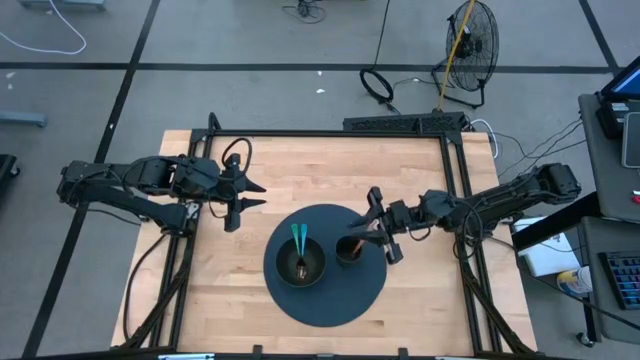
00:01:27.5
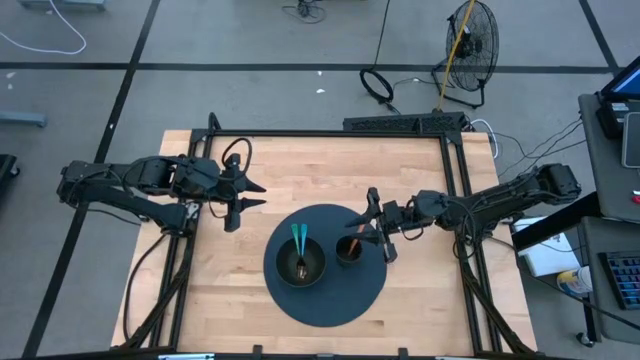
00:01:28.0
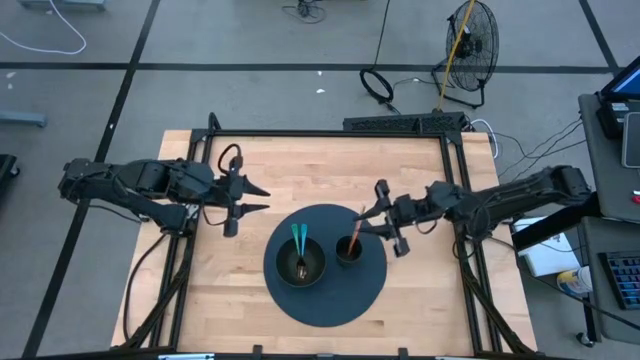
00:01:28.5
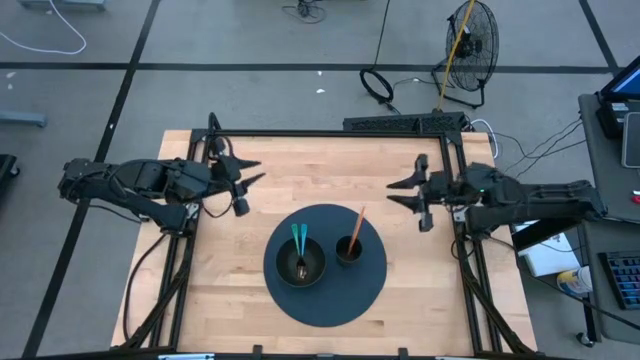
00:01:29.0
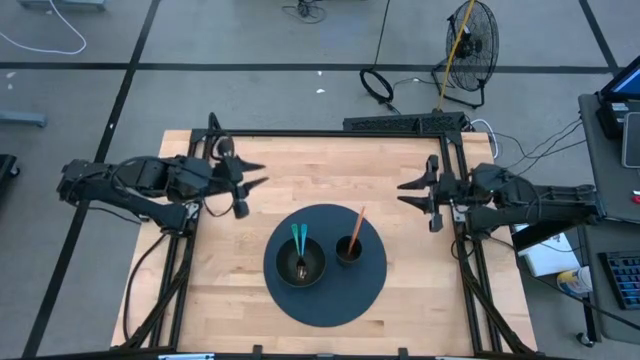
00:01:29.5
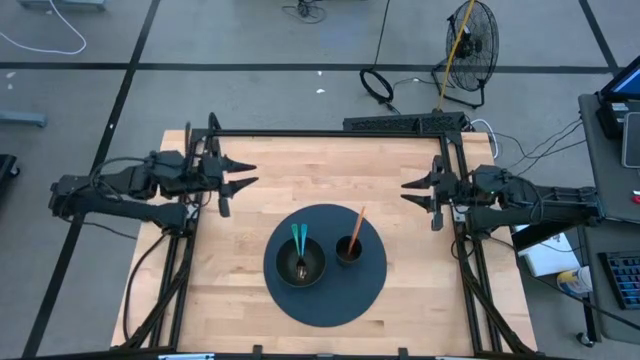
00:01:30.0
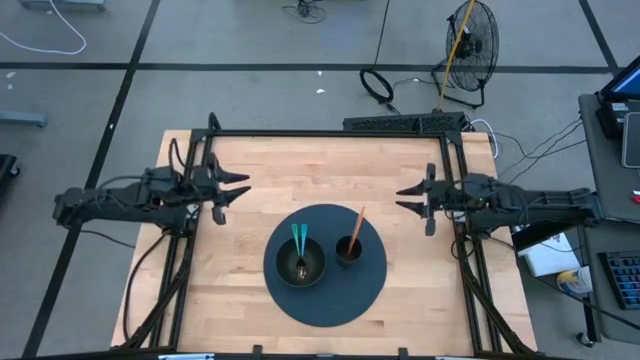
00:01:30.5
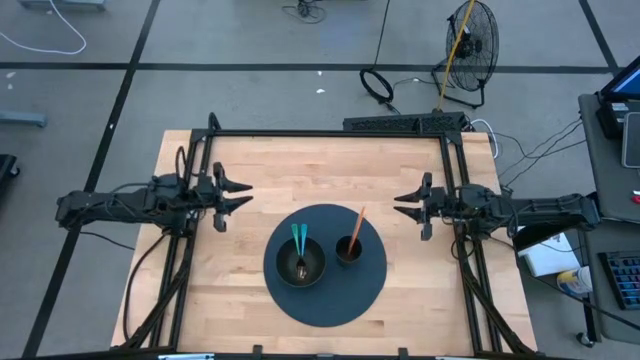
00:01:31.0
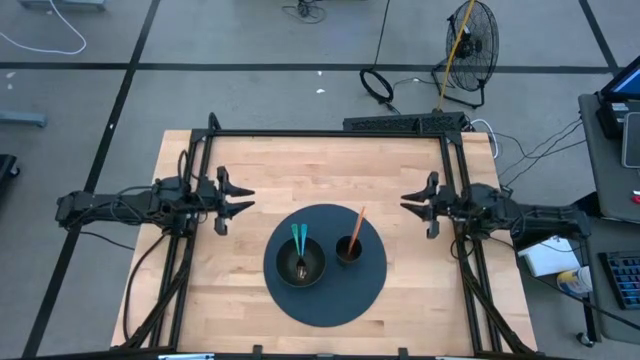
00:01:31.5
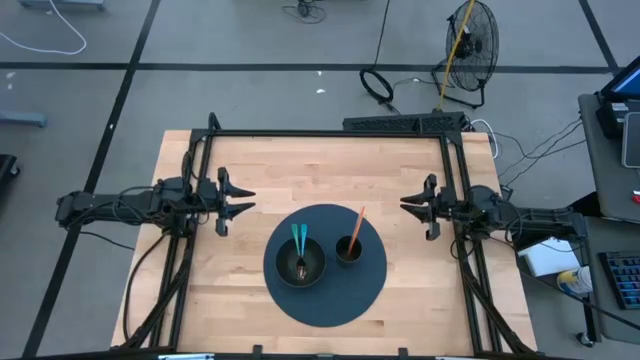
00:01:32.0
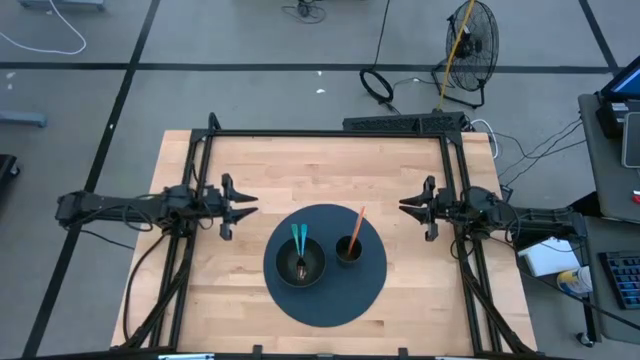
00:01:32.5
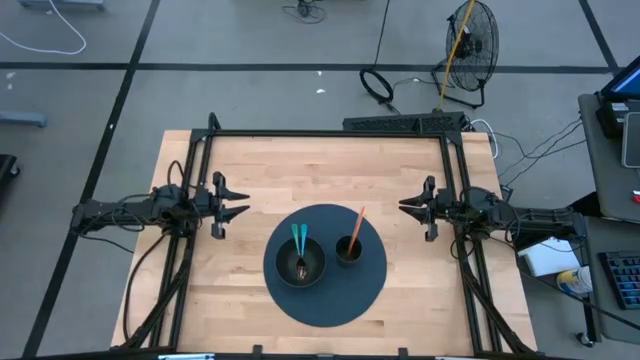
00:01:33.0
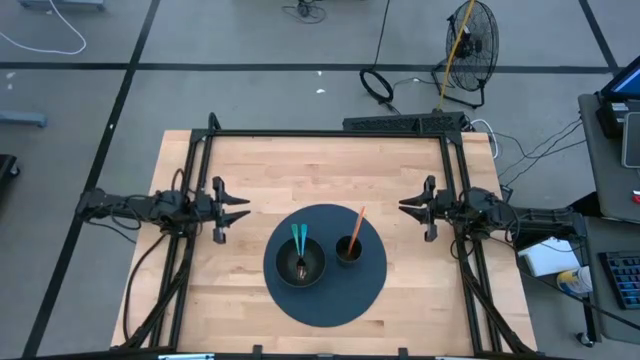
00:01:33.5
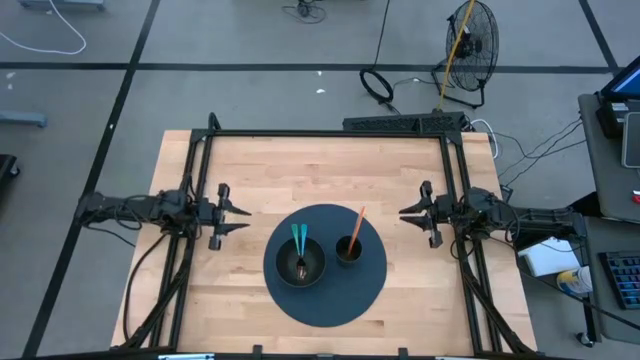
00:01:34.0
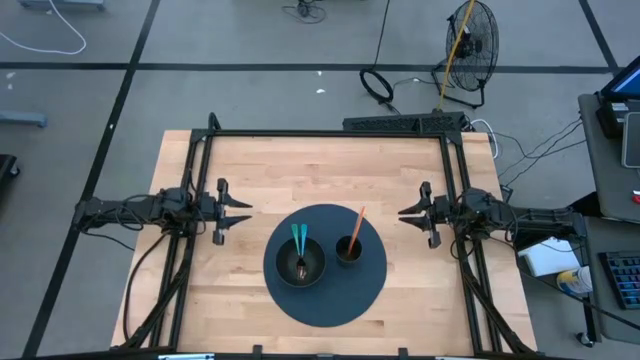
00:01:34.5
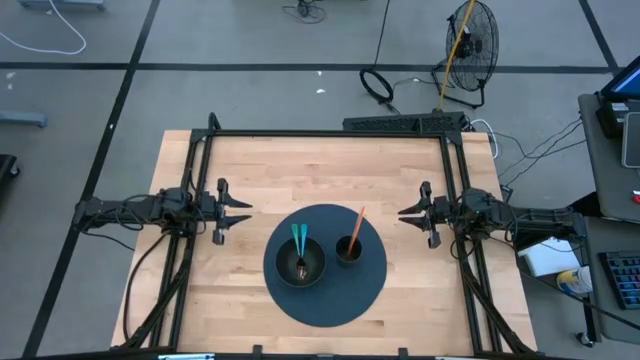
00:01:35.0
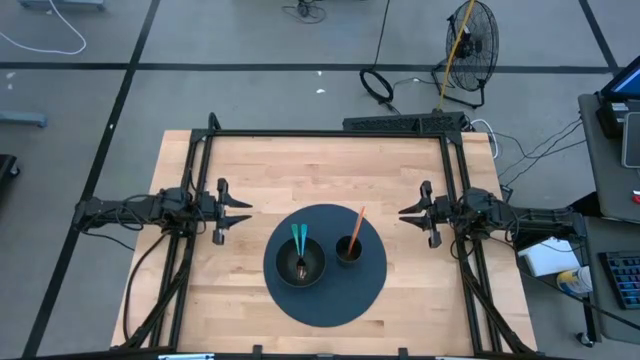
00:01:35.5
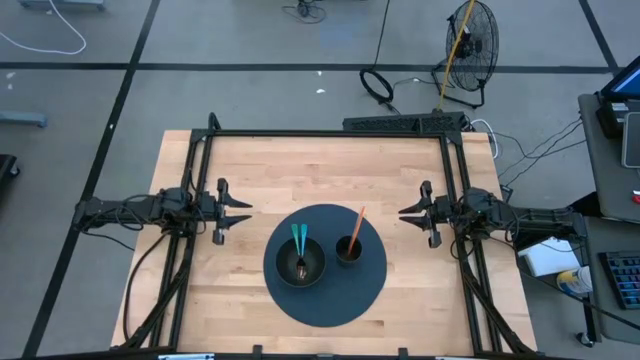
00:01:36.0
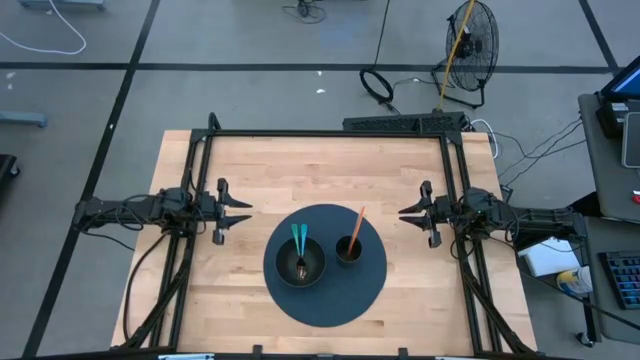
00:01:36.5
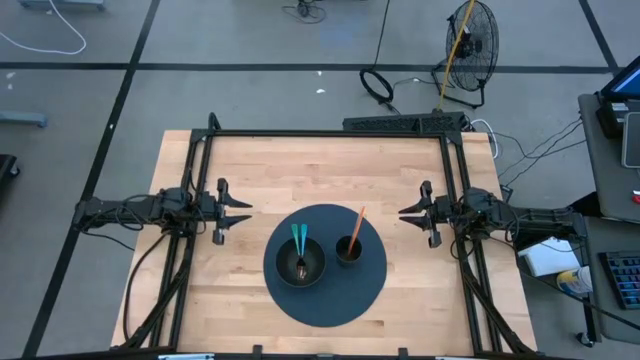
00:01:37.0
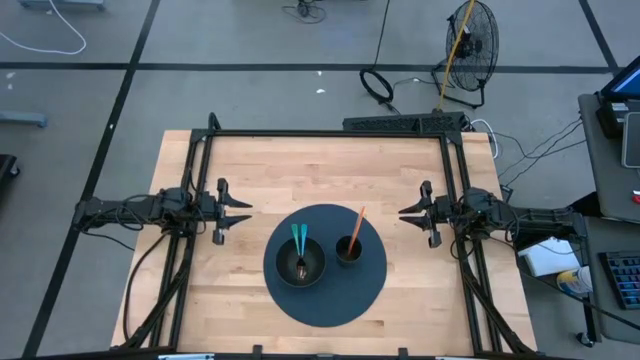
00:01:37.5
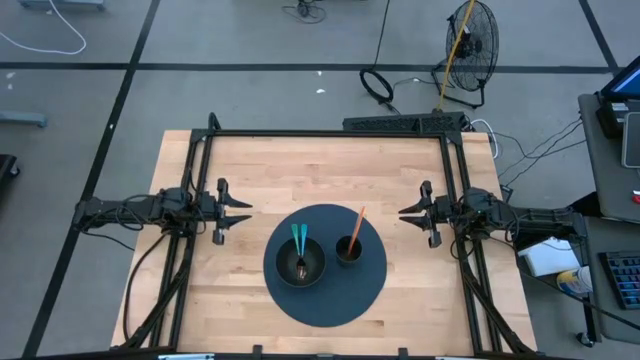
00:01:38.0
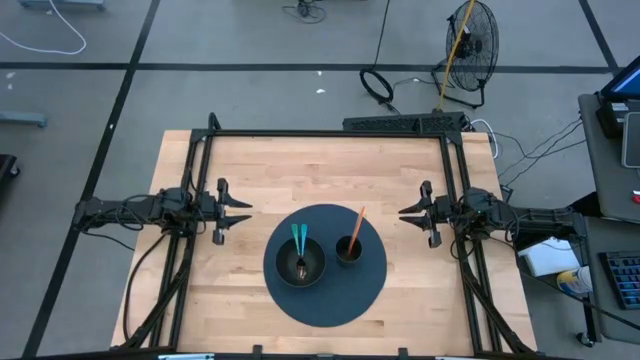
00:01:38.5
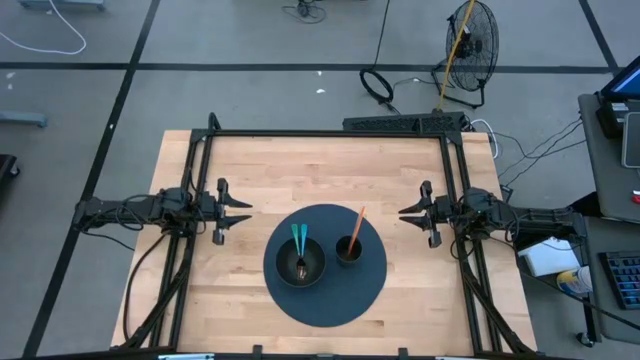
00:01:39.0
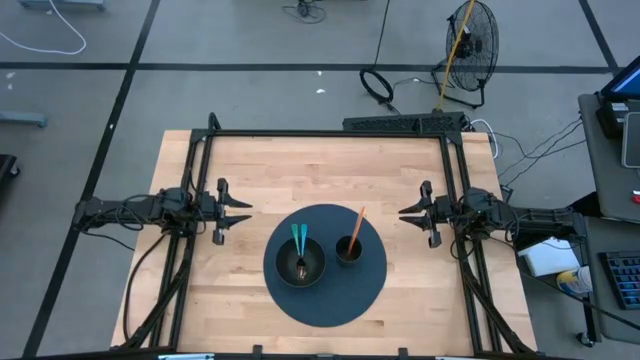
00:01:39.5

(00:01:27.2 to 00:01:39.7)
Task: Pick & Place Utensil
Return to home position

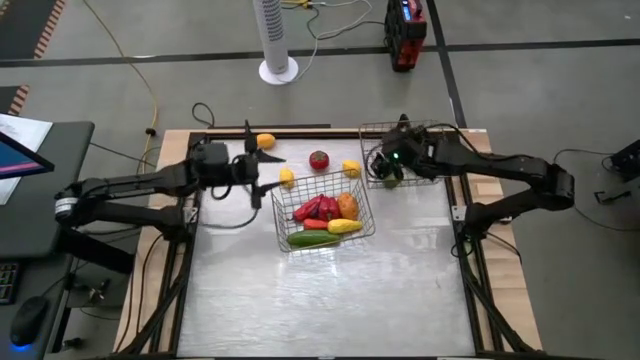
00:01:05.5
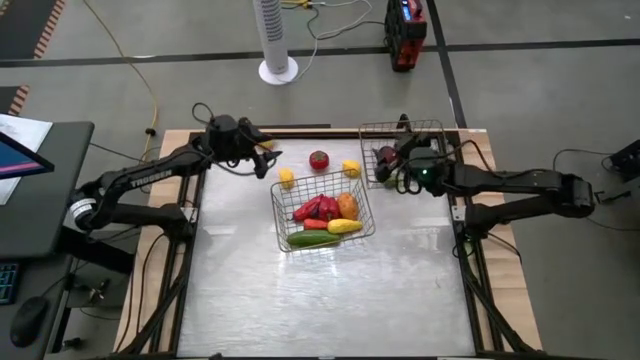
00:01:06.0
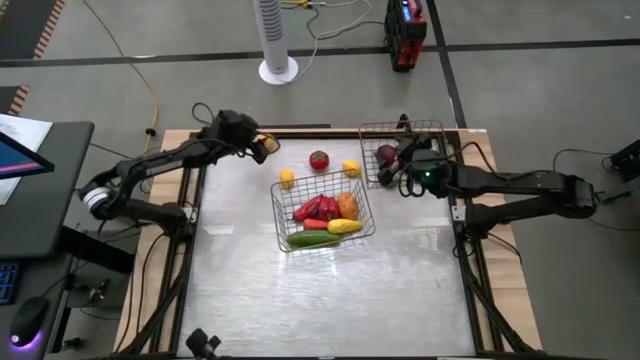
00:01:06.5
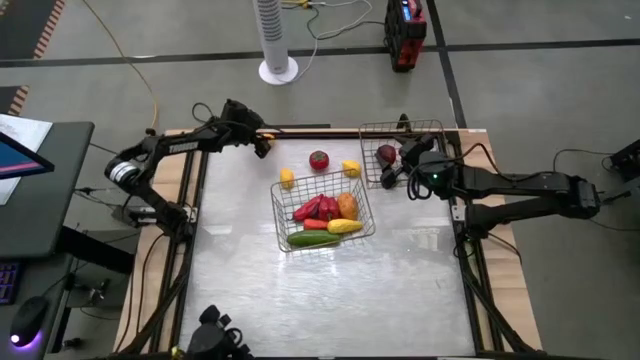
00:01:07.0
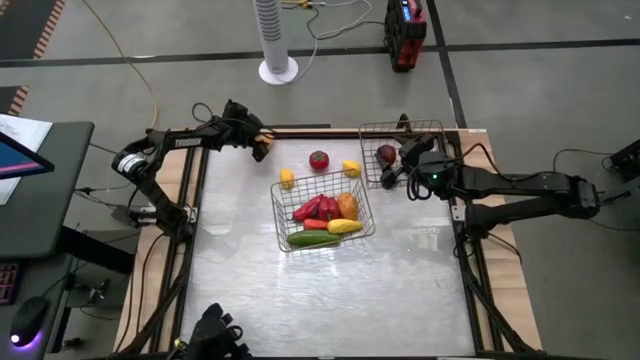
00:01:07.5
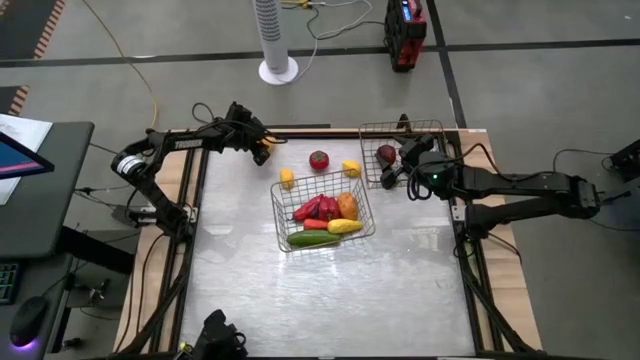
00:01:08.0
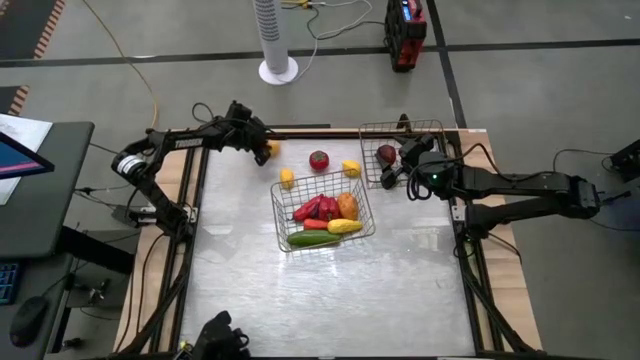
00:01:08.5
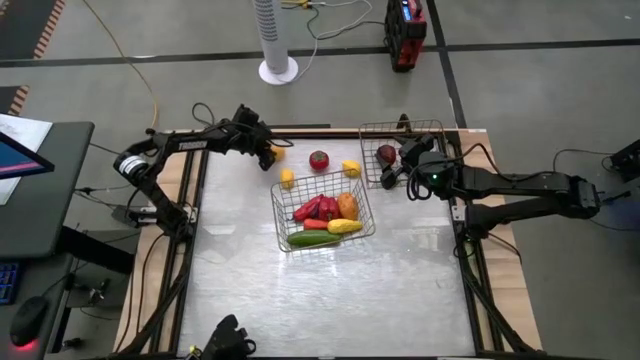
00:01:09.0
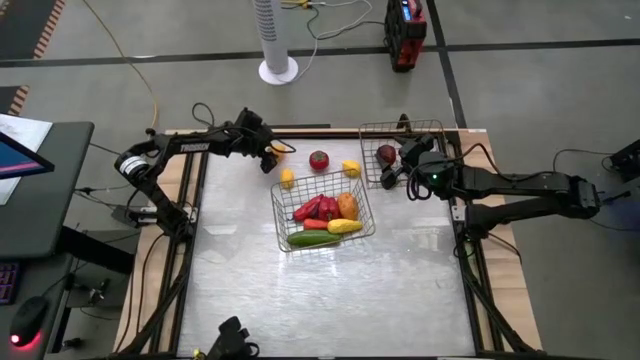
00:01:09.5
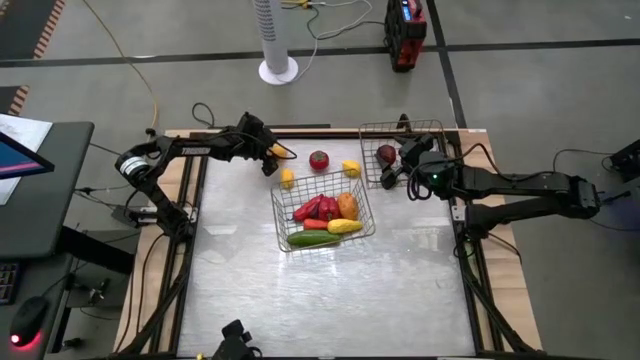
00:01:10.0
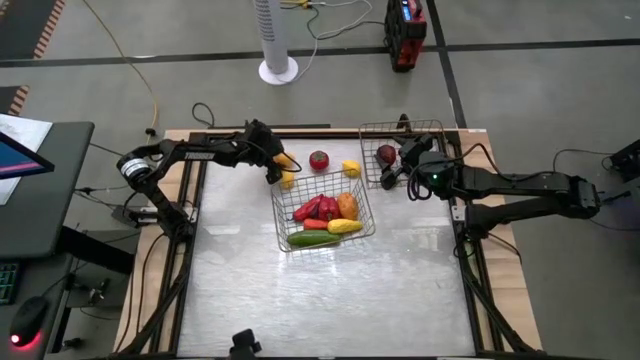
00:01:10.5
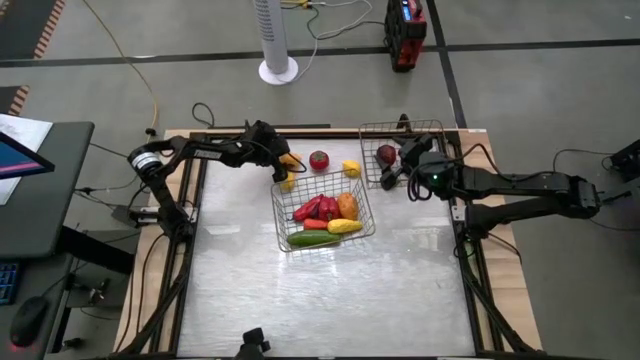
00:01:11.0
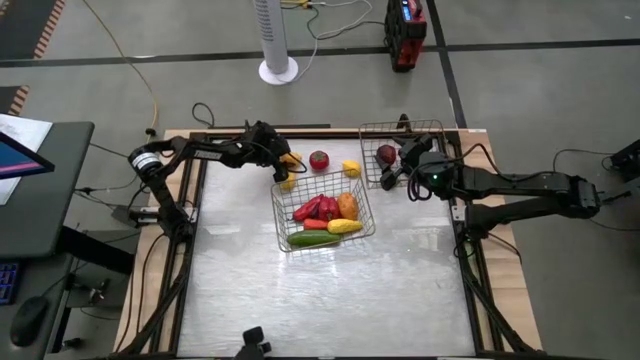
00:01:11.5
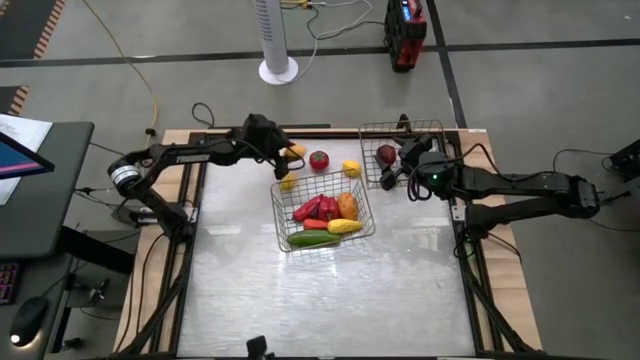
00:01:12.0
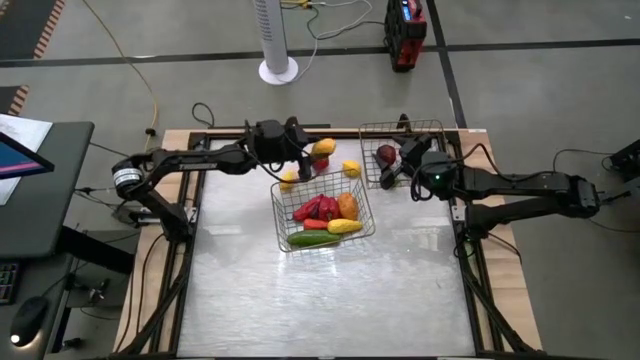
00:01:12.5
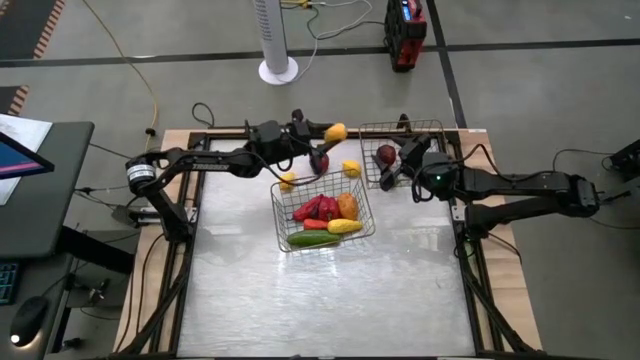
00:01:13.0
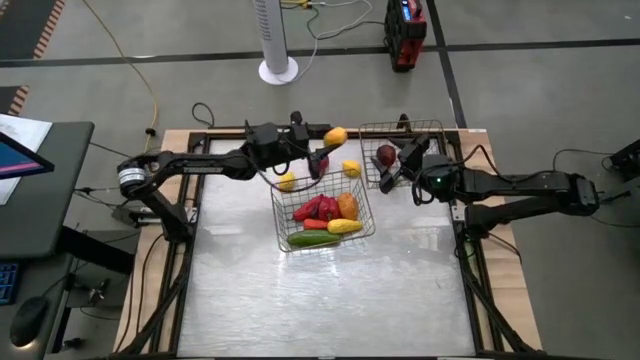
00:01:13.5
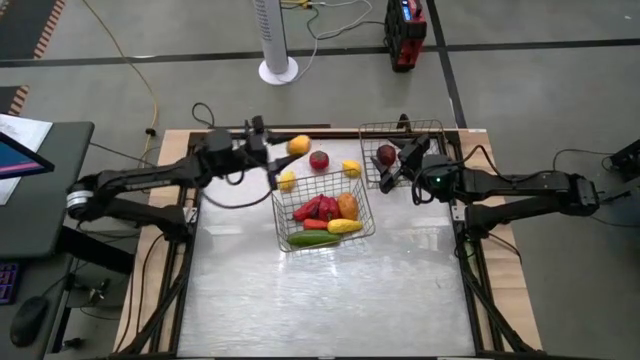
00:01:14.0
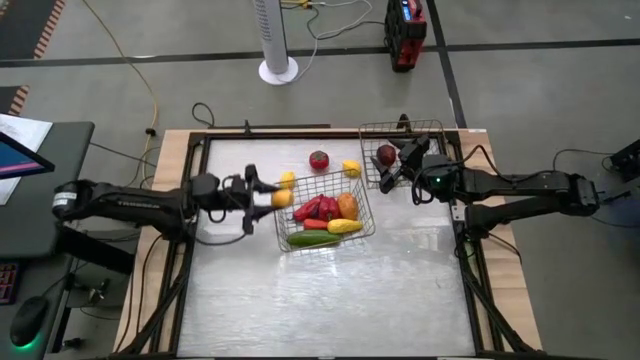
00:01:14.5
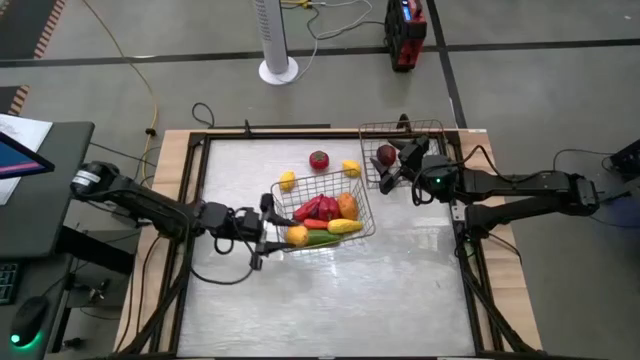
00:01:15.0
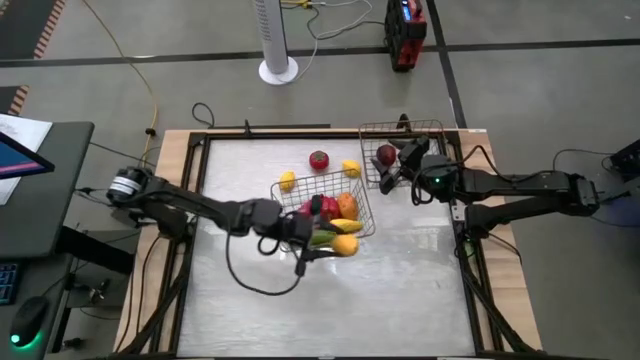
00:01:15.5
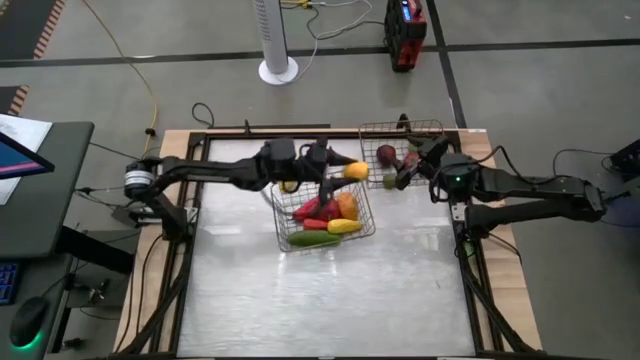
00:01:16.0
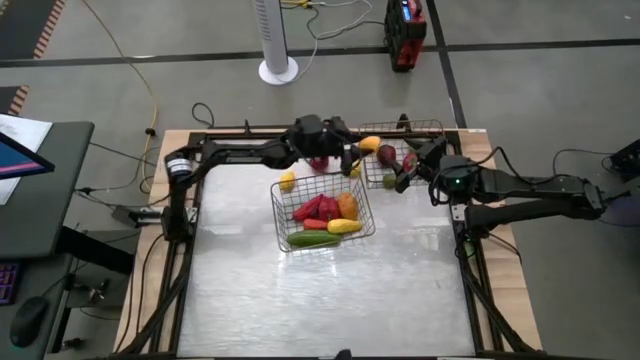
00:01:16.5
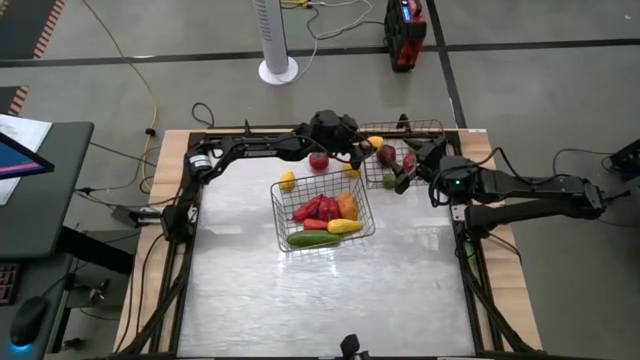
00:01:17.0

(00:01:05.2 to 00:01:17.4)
Task: Sort produce into baskets
Put the yellow lemon into the right wire basket
